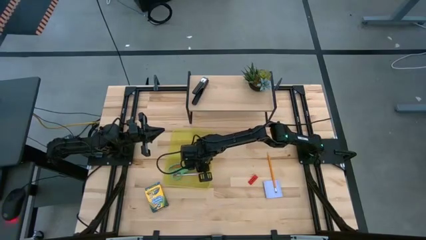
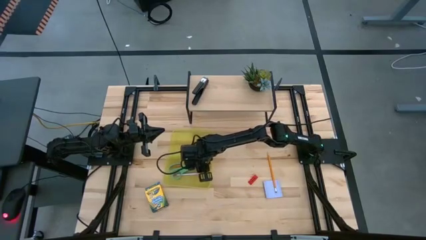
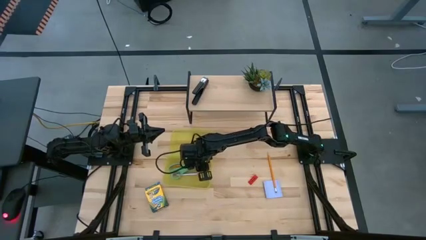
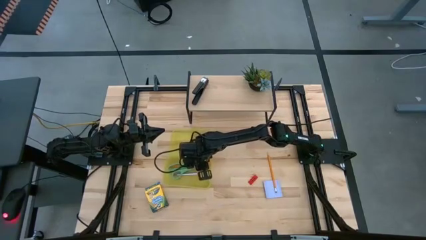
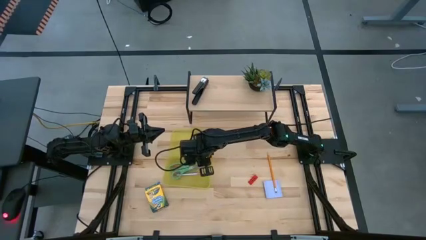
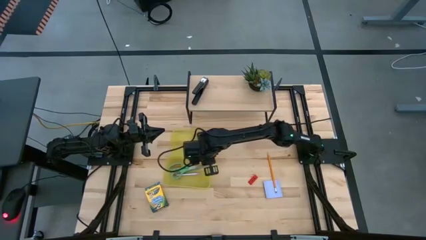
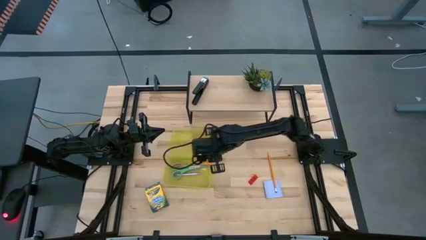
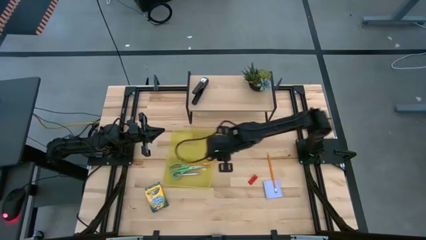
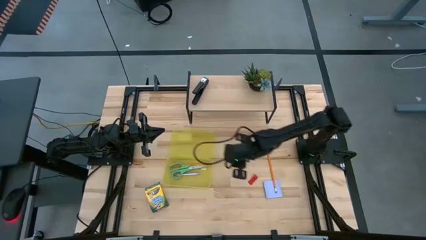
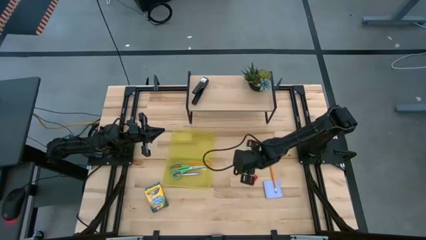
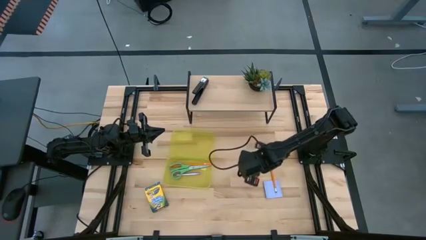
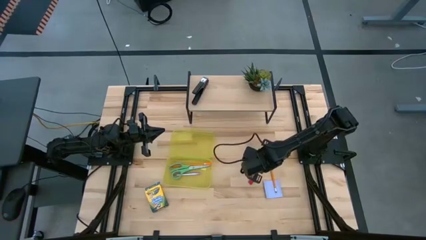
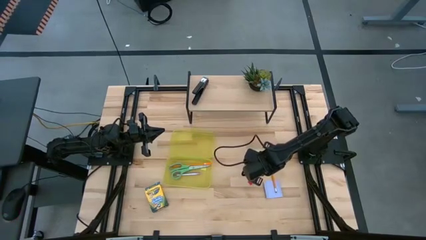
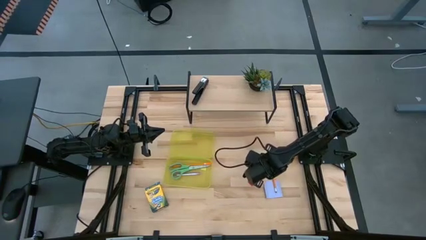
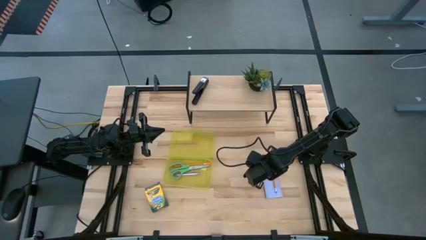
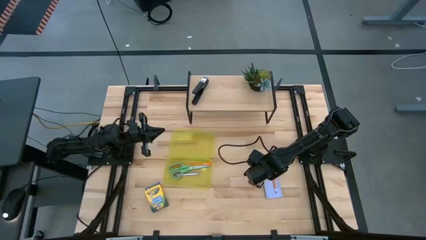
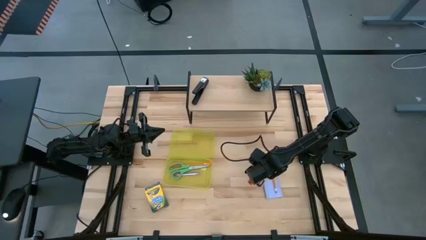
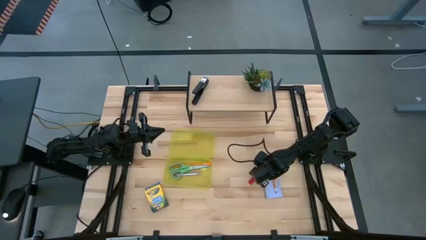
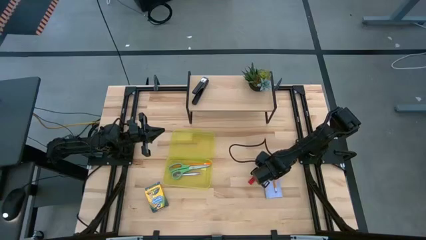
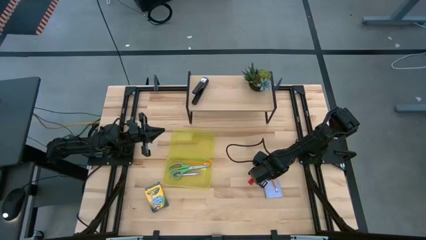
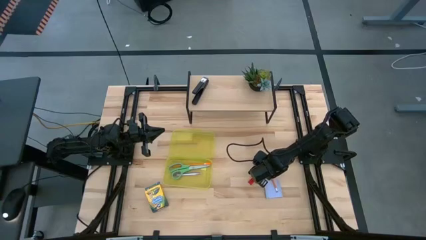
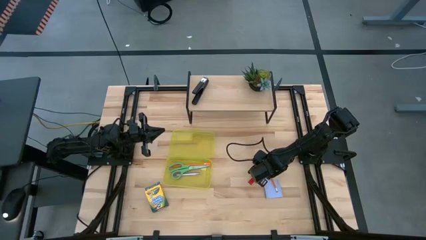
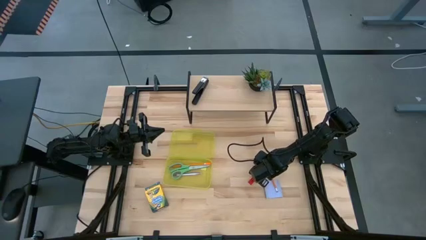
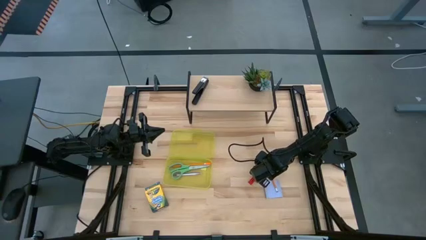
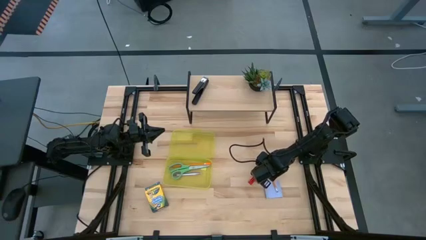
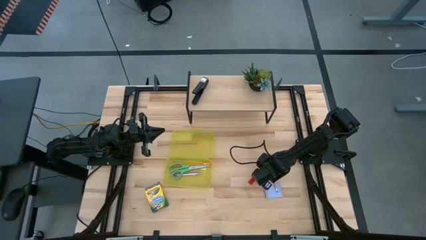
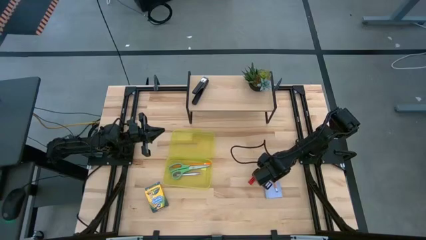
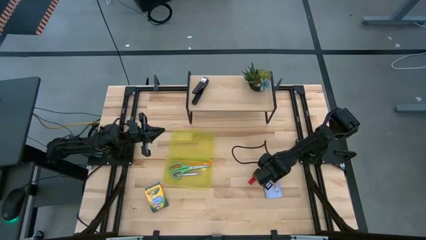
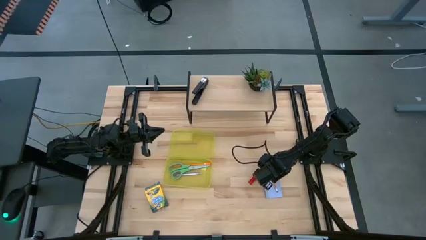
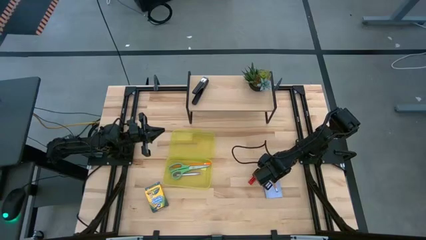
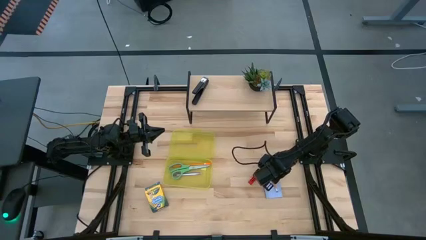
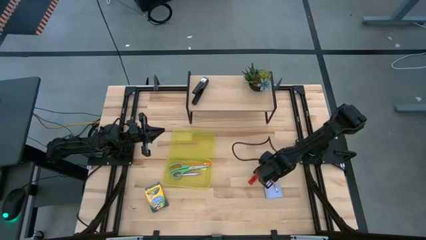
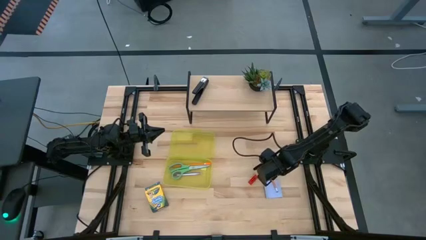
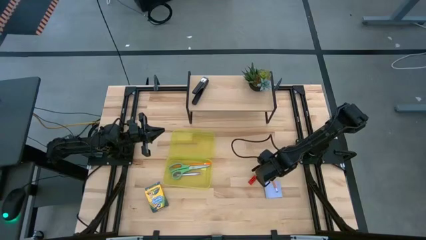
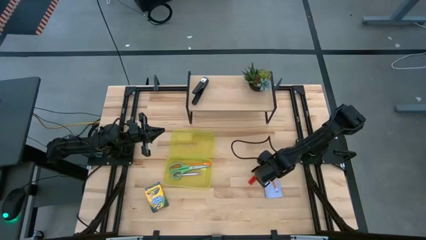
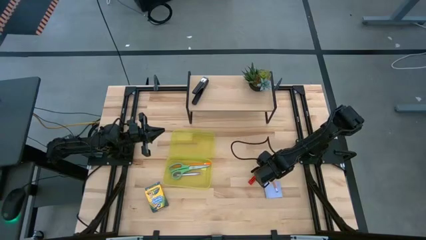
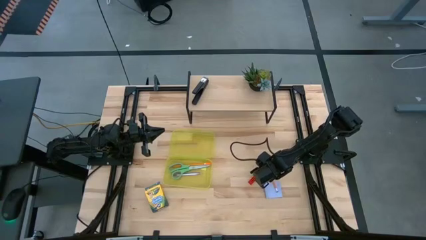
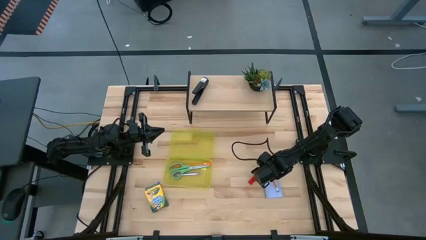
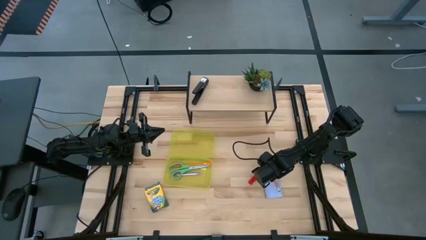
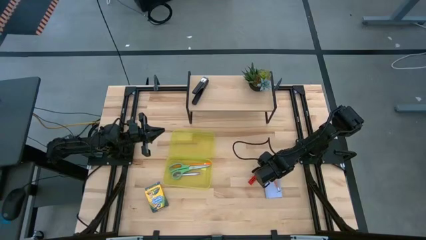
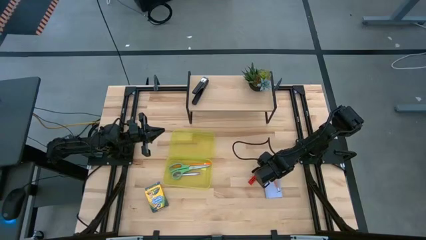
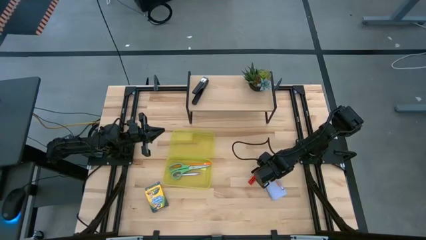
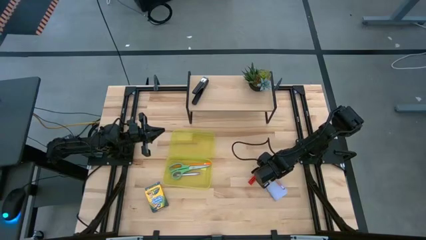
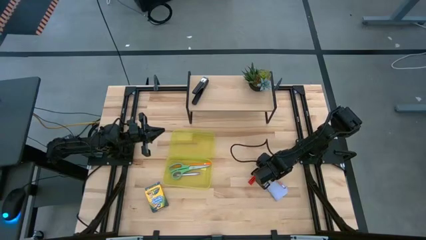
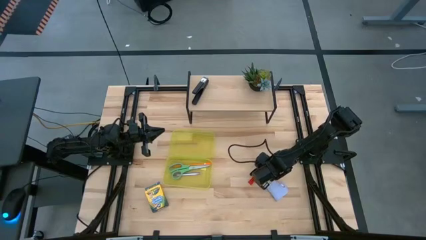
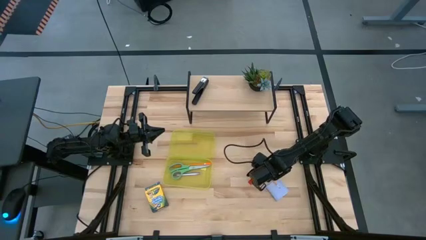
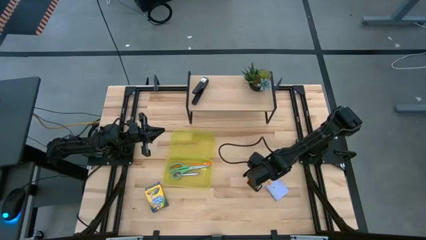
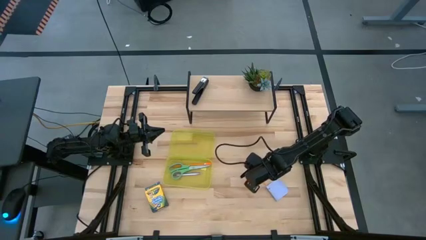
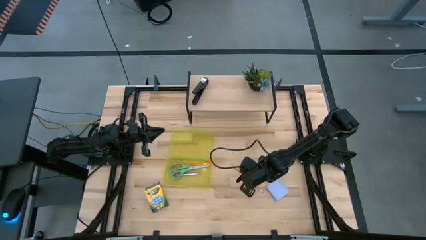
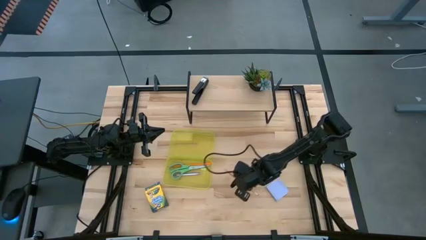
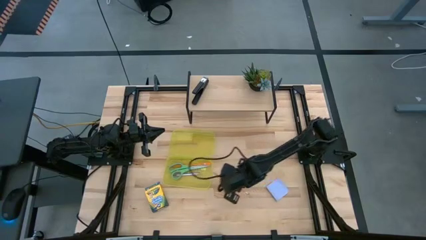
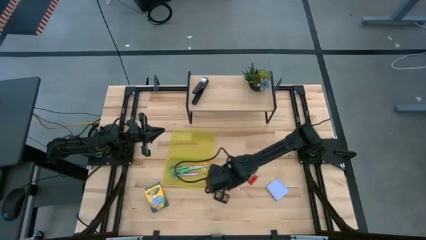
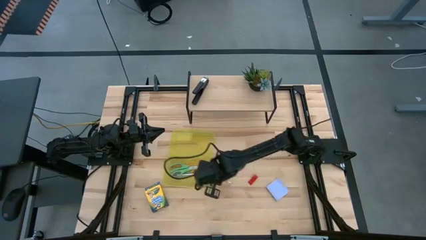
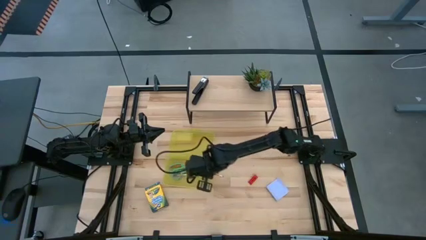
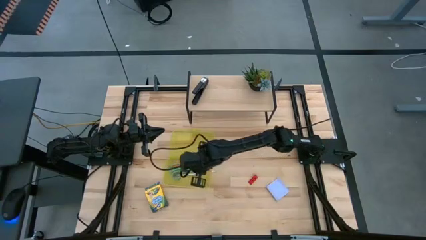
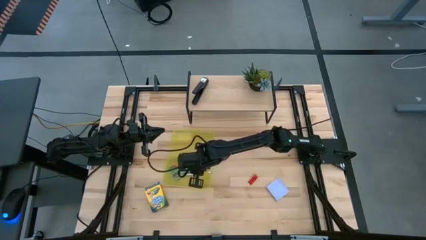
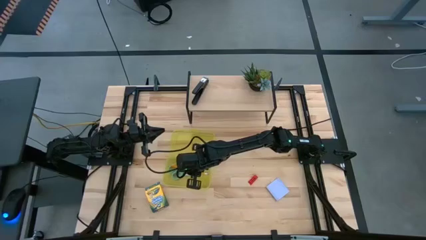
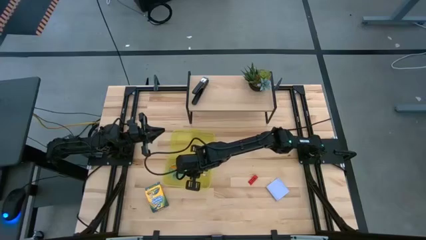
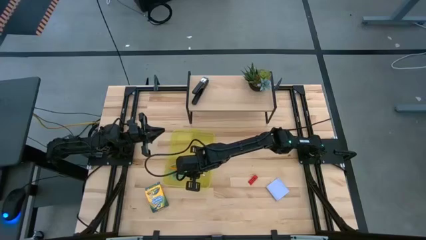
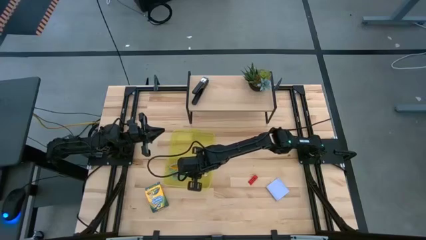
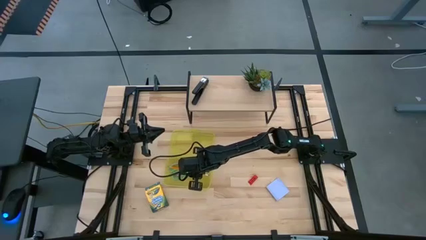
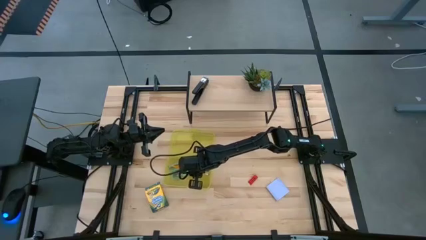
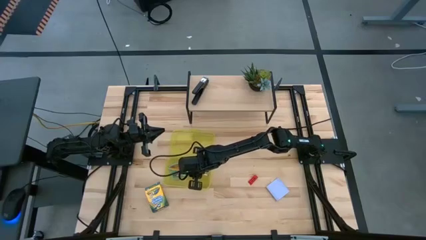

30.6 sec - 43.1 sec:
Task: Pack school essentials
Put the yellow pencil into the supply box

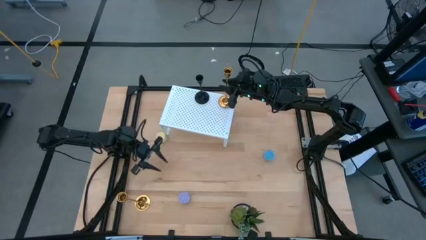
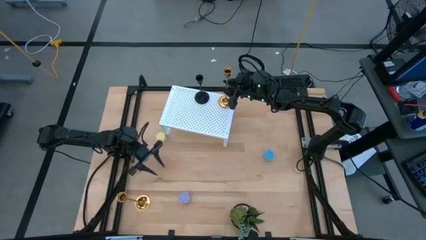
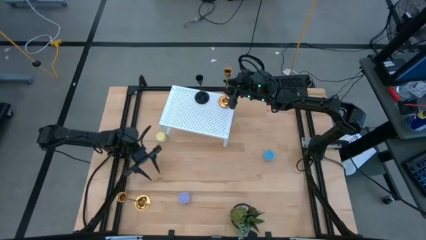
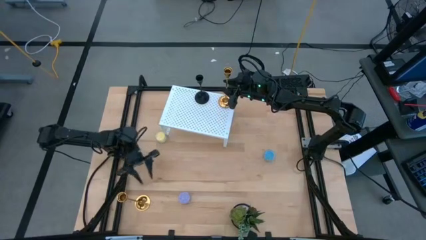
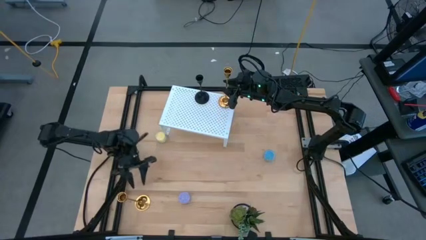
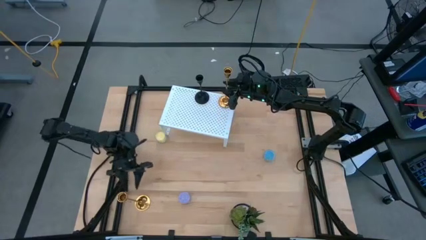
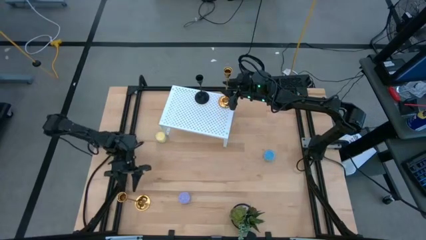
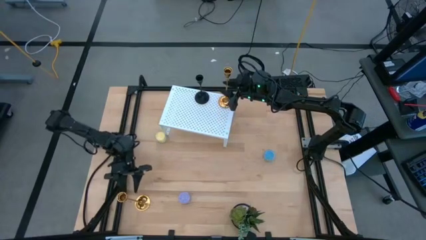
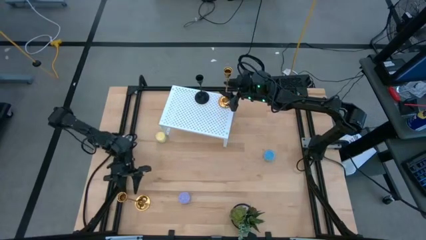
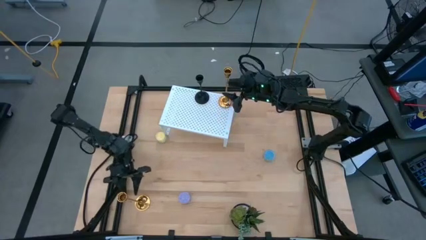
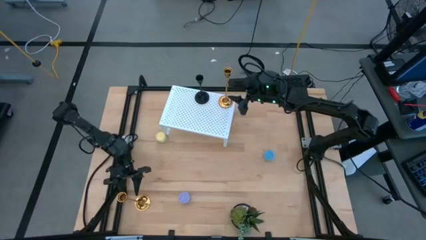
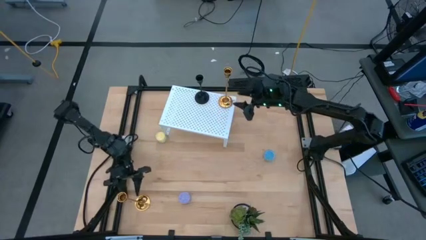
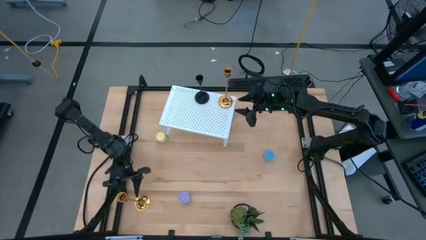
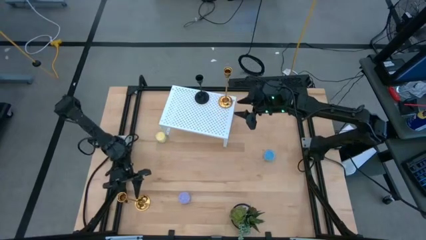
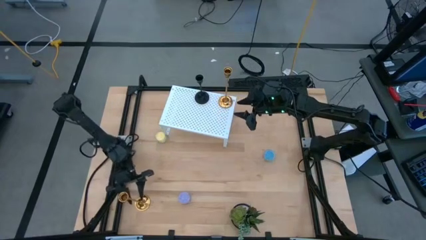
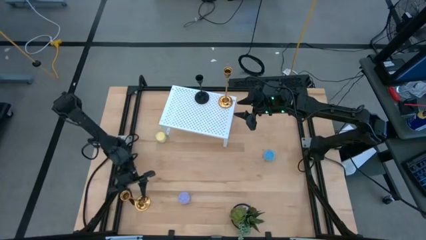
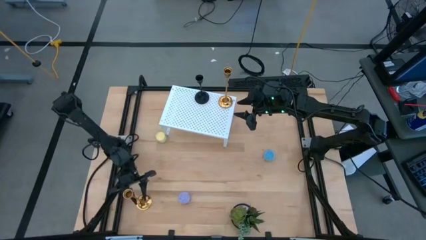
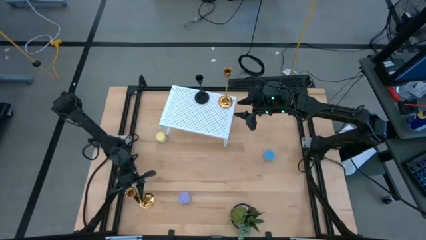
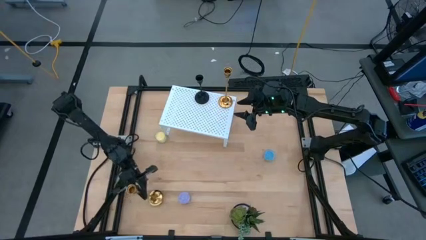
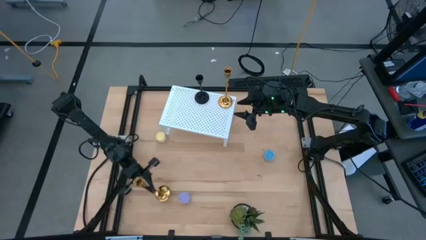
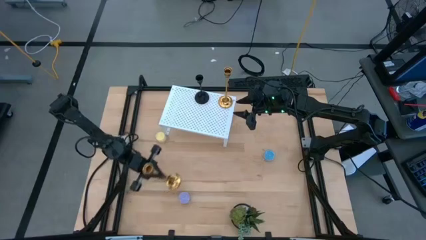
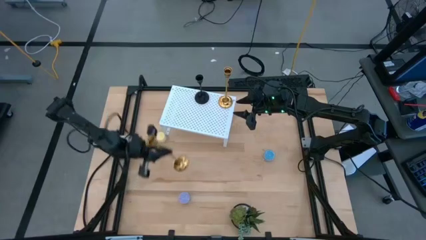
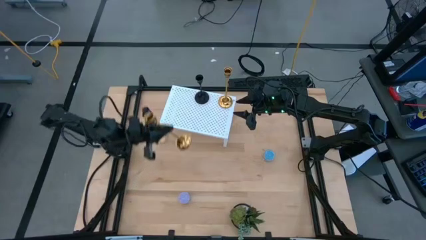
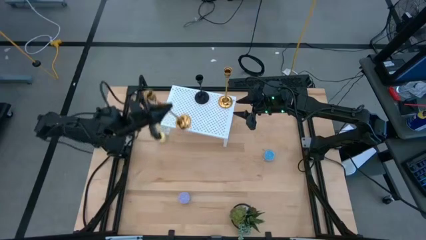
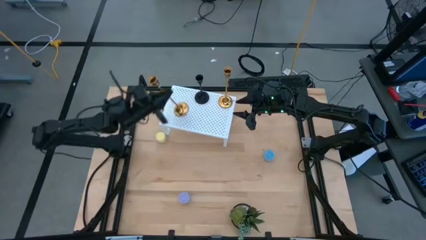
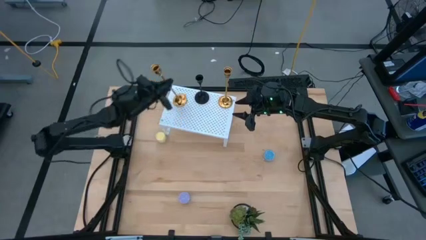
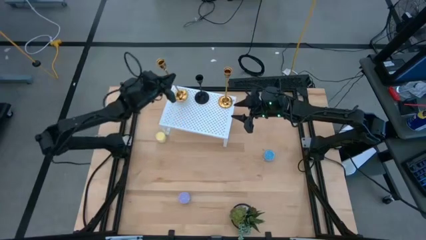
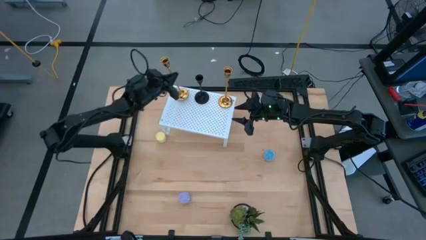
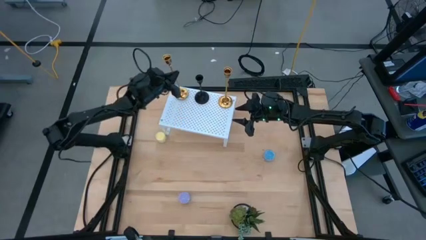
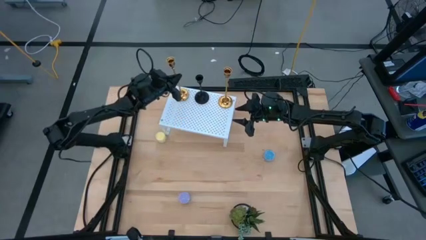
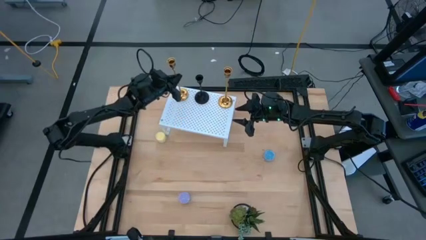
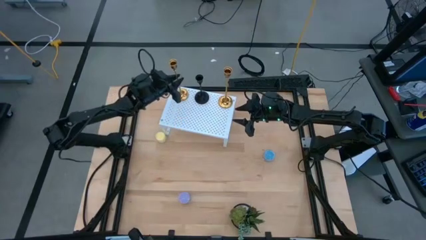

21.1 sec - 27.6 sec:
Task: Pick & Place candle stick holders
Put the gold candle holder on the shelf
